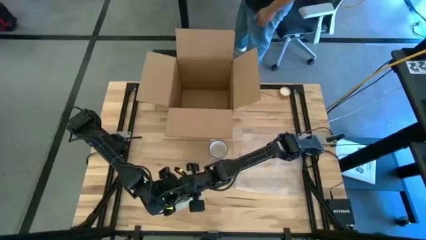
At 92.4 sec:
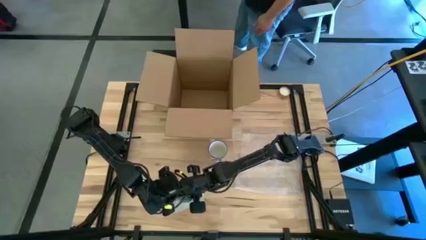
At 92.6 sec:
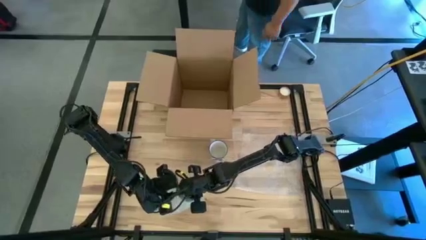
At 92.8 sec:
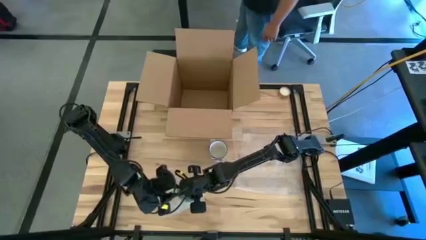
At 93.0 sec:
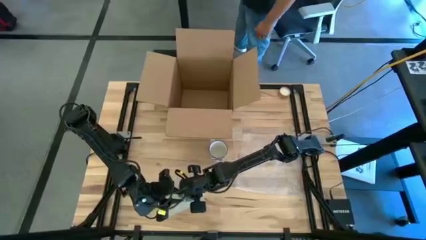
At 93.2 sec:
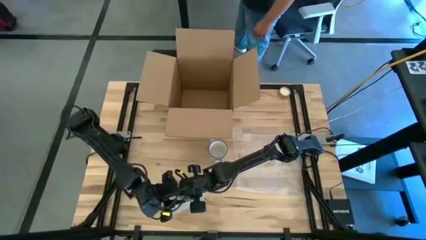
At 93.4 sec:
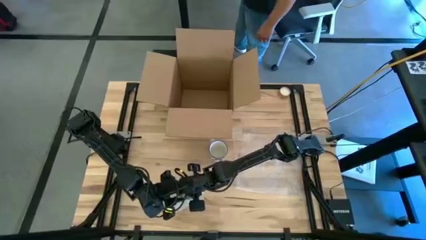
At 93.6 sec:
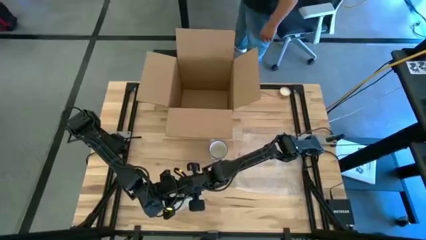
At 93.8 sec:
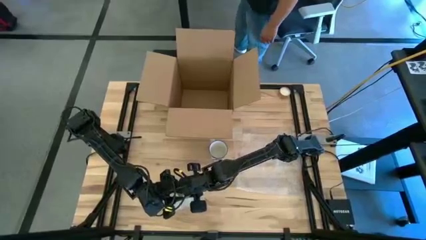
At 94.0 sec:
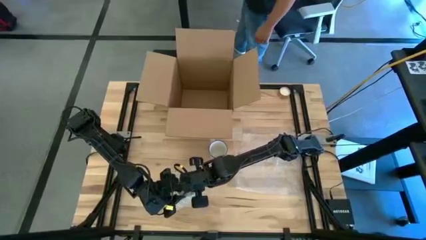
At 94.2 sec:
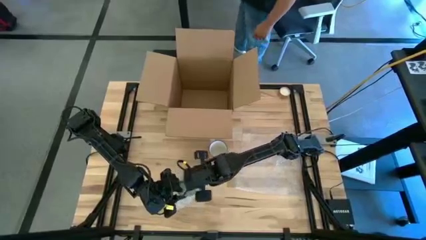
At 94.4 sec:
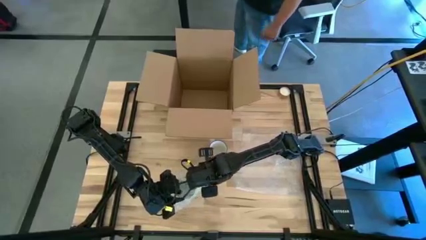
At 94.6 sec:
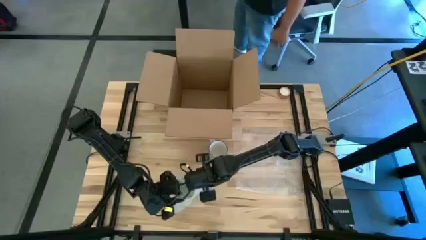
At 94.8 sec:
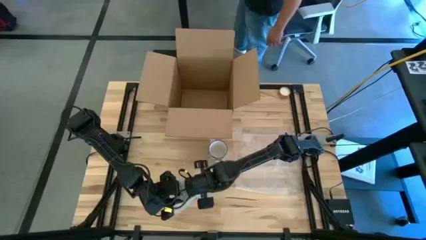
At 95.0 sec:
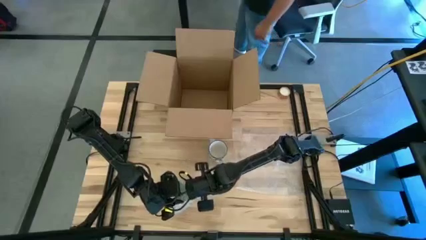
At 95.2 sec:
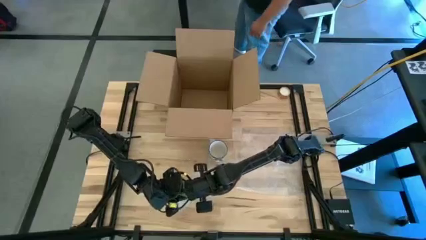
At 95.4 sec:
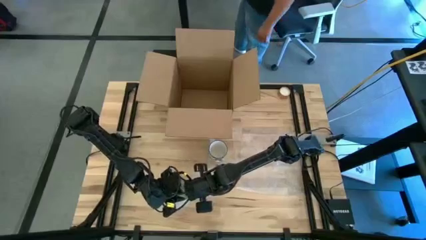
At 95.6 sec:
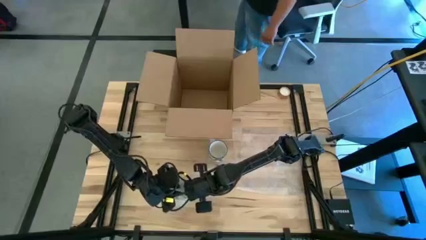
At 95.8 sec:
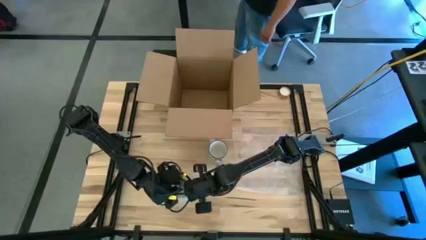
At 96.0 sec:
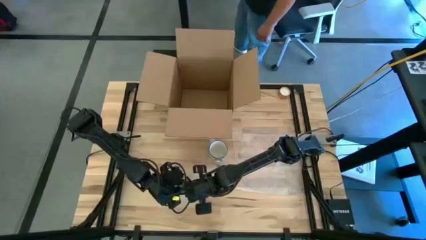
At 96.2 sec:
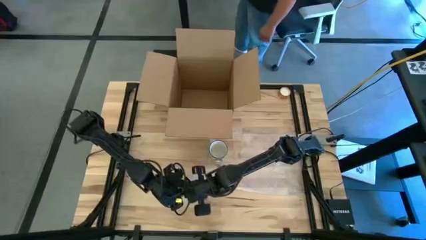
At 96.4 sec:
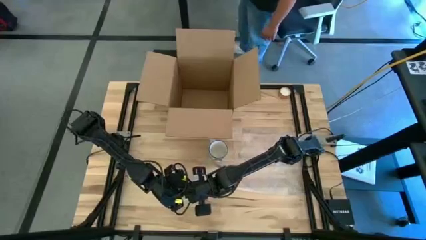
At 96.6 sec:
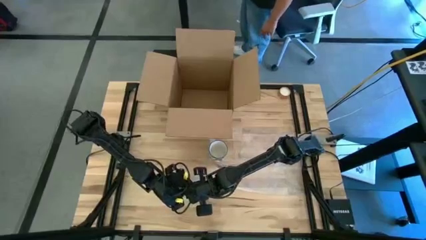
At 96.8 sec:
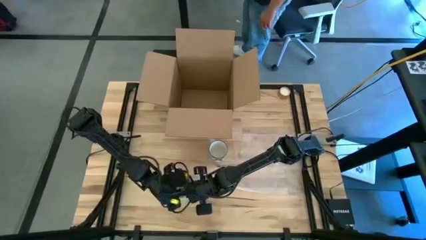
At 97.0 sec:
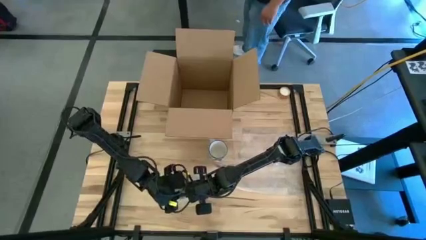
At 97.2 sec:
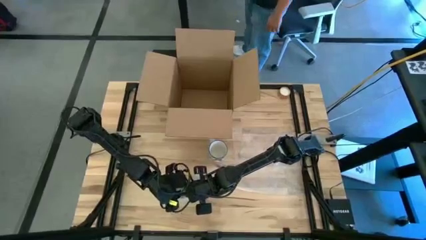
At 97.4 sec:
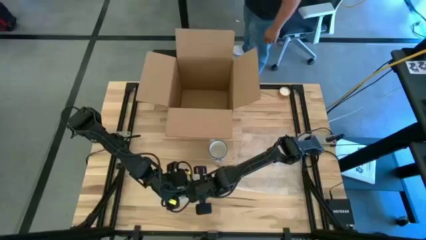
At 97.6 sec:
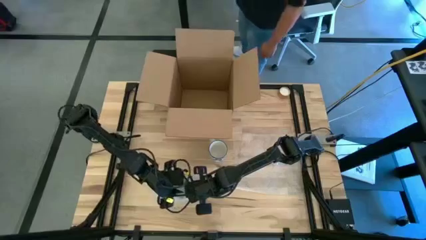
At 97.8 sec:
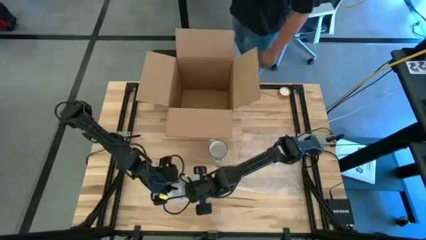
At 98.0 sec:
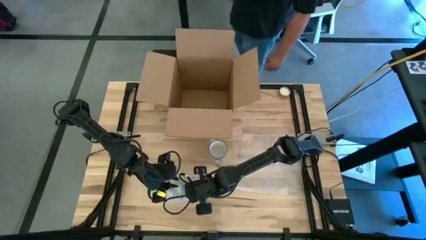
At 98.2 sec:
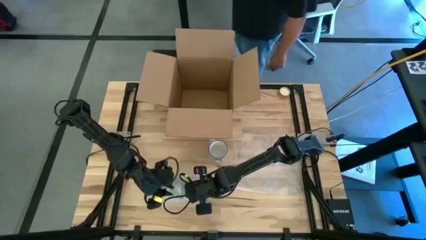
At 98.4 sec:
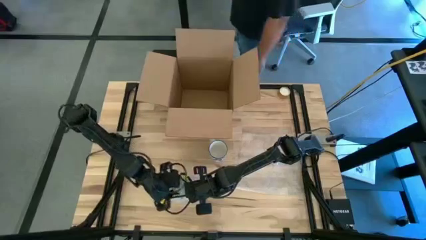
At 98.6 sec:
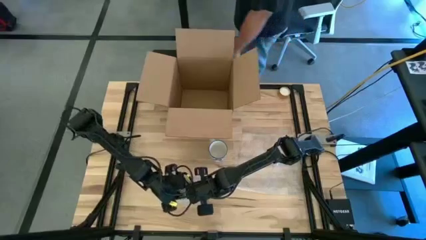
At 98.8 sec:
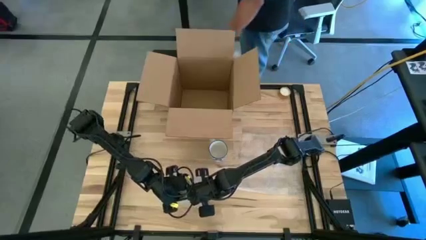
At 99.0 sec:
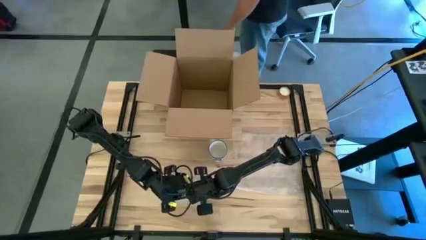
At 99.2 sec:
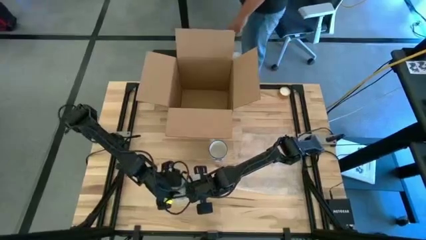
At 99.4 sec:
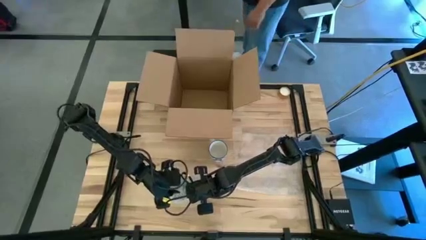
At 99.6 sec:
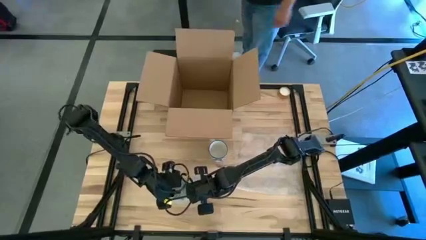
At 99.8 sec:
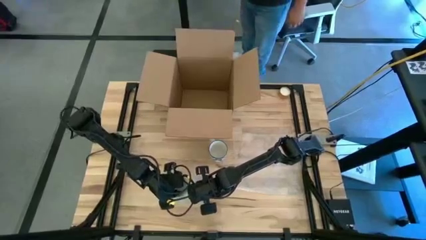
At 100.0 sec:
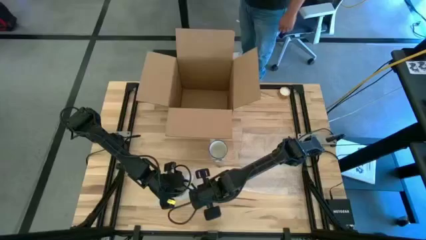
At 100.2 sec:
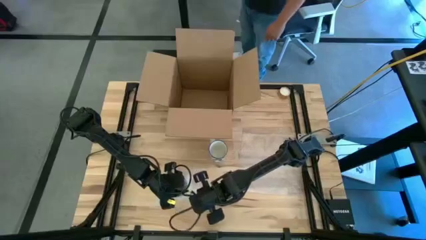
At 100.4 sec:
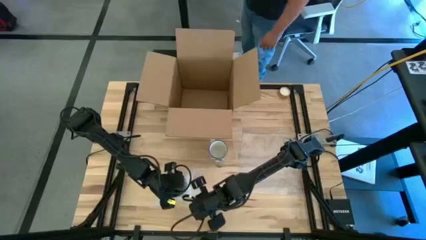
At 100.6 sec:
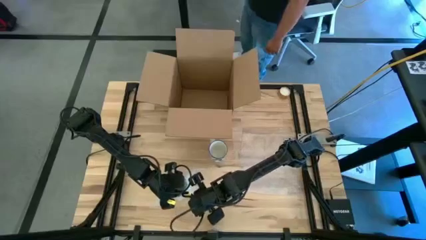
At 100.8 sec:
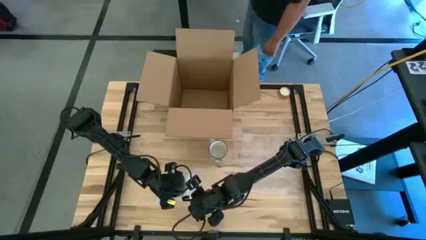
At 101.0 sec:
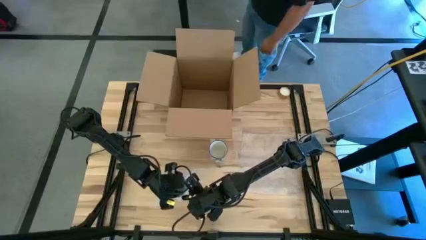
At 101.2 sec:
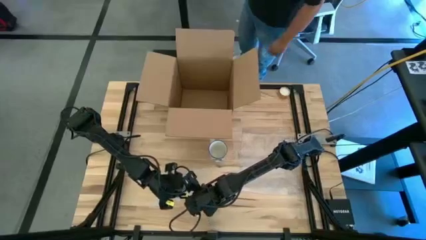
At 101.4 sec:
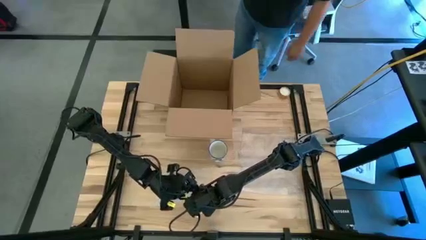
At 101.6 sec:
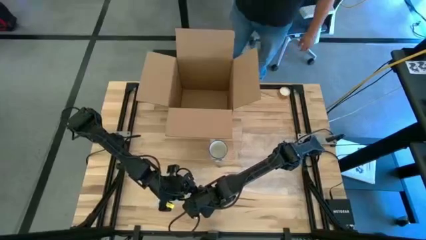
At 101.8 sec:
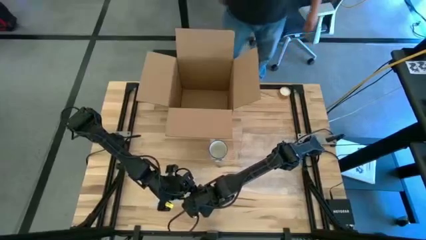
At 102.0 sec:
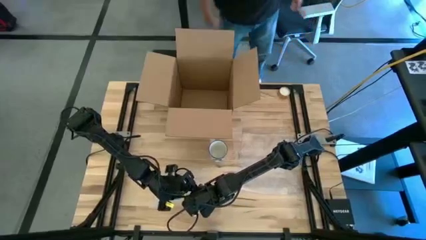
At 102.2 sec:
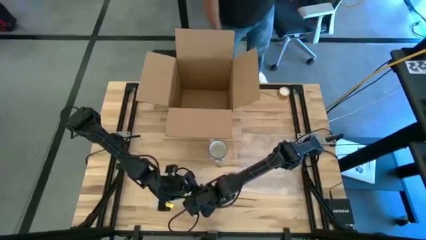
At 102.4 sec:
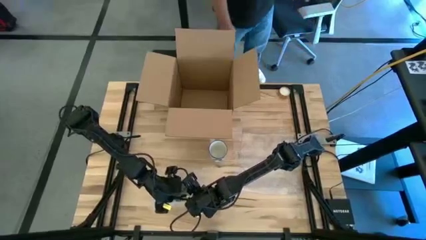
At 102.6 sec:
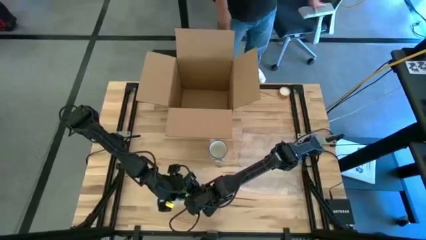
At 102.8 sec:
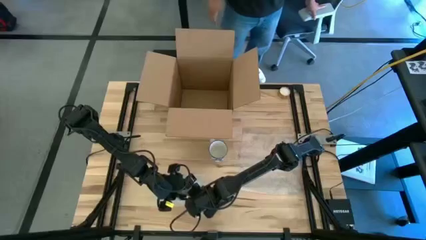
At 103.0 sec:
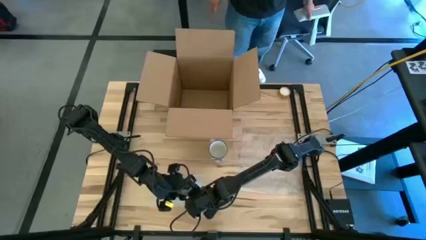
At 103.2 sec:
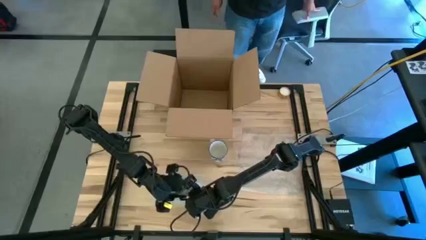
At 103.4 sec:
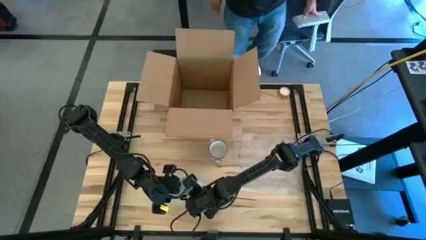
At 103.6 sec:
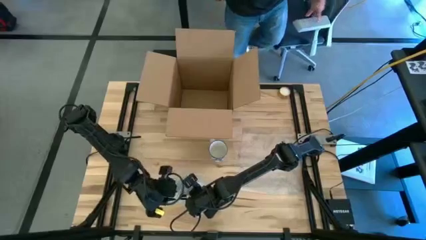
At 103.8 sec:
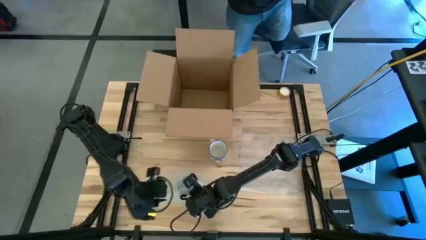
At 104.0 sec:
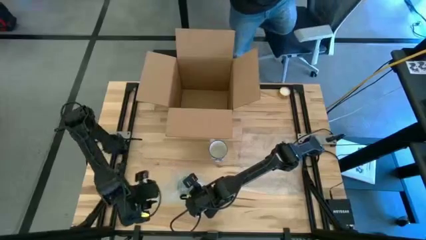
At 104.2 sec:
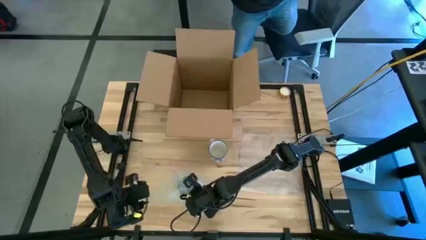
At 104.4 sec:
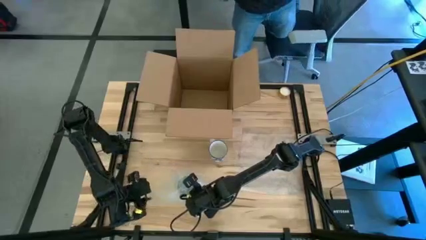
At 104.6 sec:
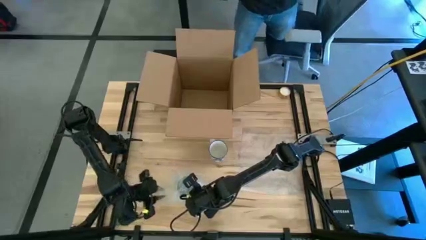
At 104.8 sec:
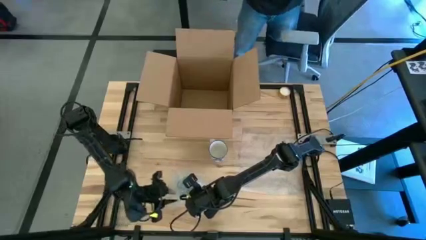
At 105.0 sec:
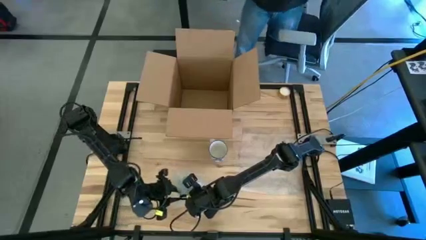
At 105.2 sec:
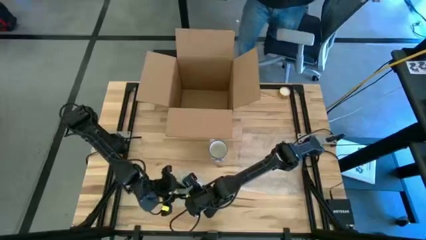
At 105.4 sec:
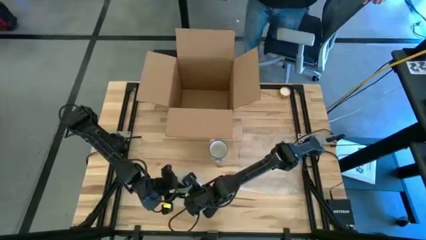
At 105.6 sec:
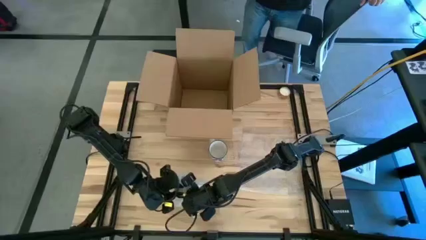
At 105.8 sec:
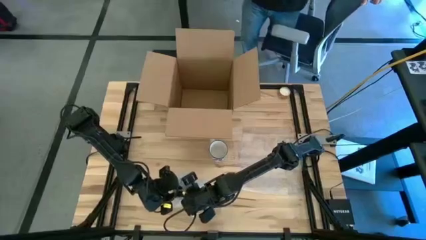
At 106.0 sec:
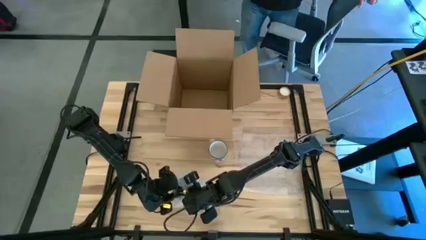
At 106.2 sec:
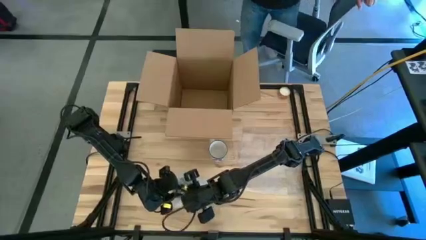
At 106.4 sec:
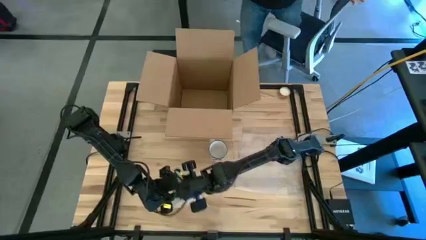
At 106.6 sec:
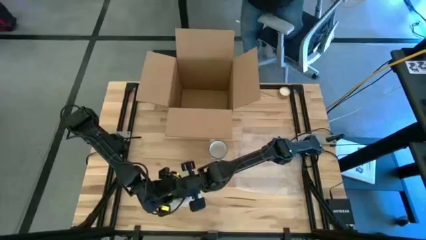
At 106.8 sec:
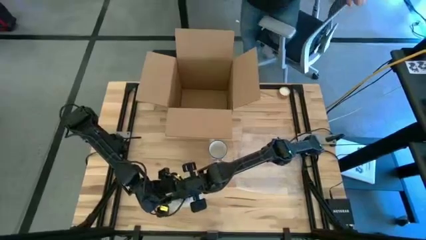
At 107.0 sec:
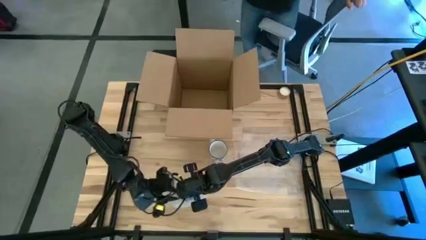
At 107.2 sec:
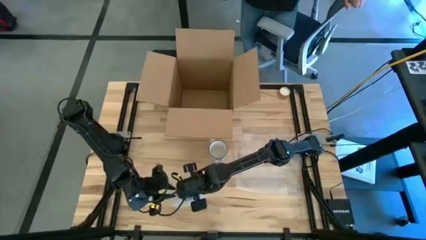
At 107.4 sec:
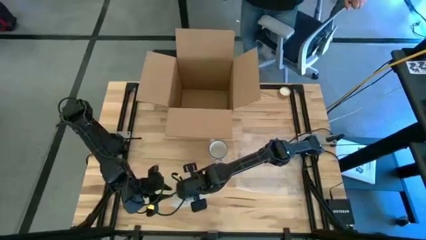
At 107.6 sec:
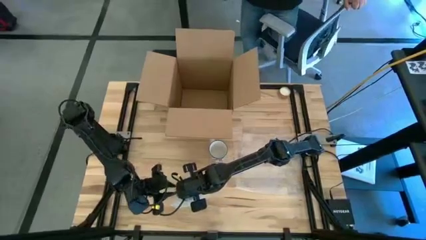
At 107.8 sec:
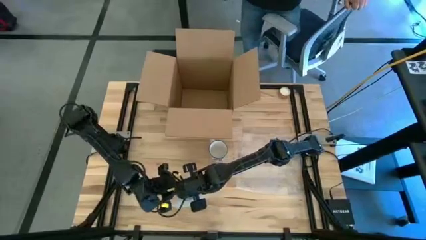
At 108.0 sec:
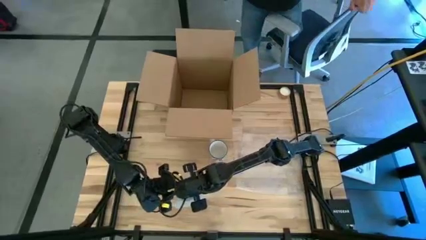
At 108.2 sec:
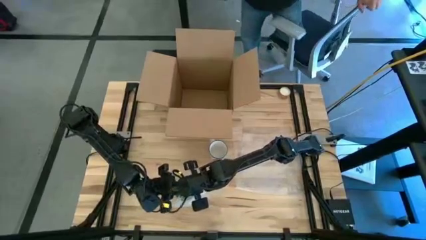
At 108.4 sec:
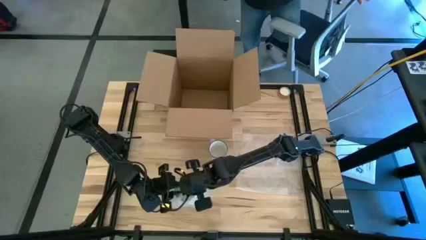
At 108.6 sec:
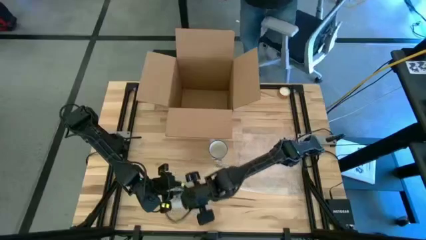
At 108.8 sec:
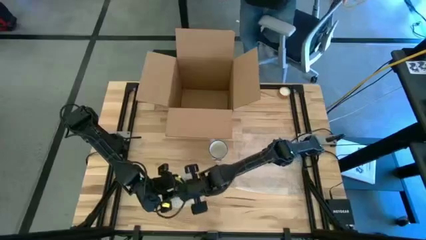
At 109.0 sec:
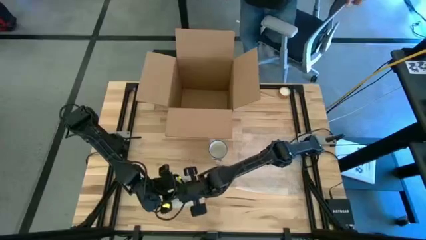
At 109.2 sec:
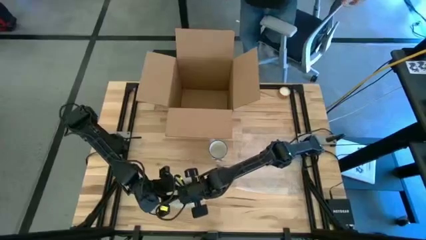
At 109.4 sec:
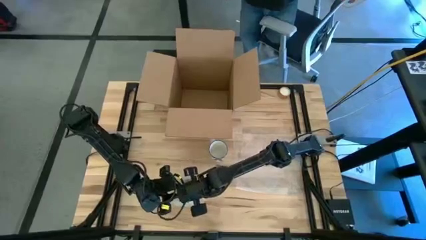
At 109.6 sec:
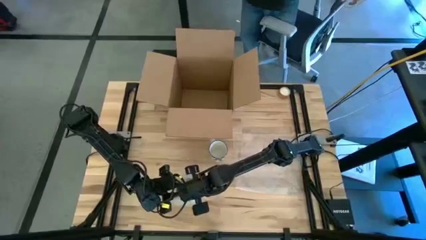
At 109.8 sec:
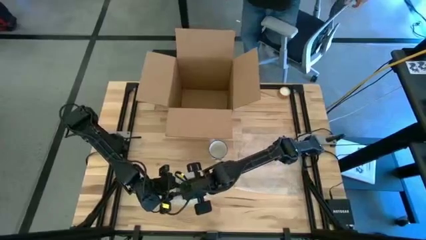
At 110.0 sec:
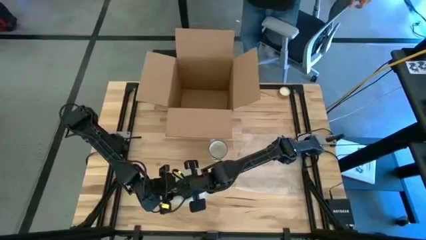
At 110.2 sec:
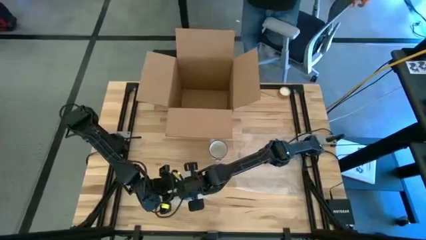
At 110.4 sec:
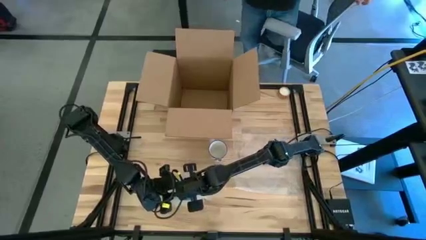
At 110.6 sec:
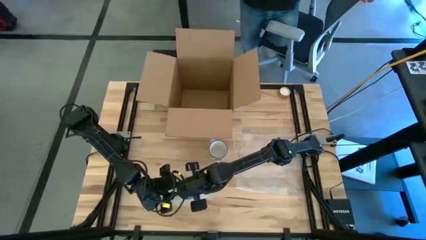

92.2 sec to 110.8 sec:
Task: wrap mug
Wrap the green mug with the left side transparent bubble wrap
